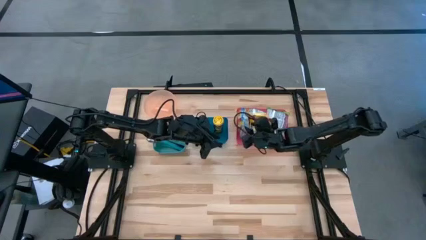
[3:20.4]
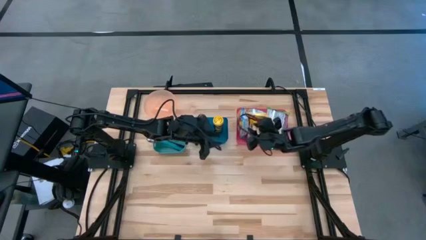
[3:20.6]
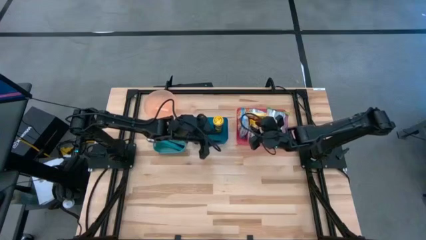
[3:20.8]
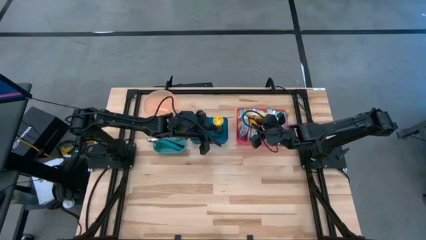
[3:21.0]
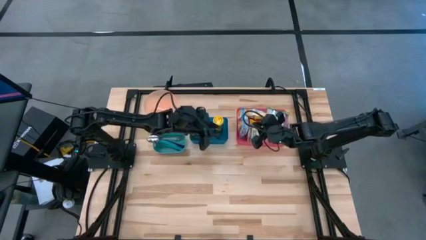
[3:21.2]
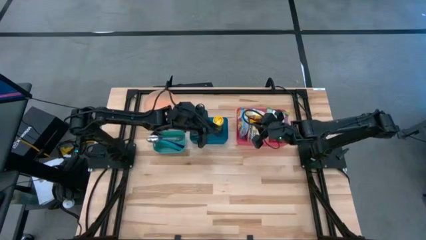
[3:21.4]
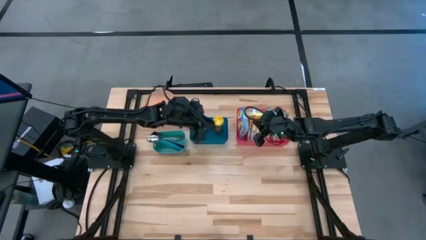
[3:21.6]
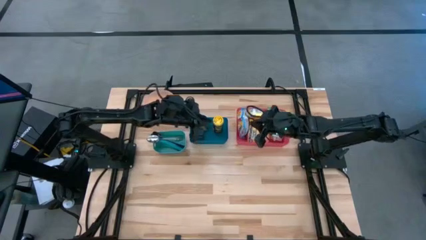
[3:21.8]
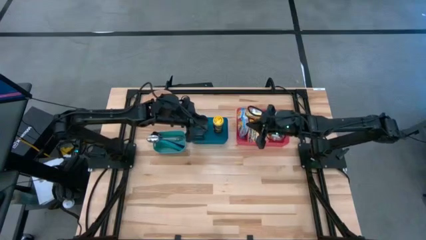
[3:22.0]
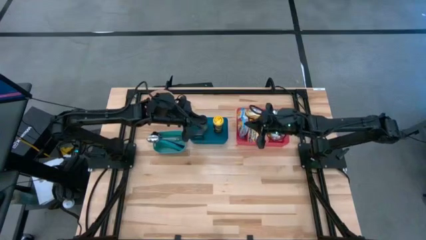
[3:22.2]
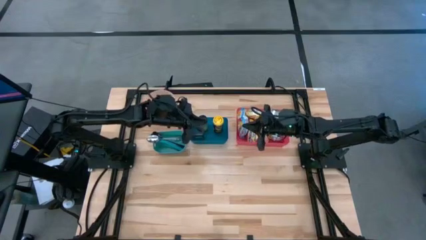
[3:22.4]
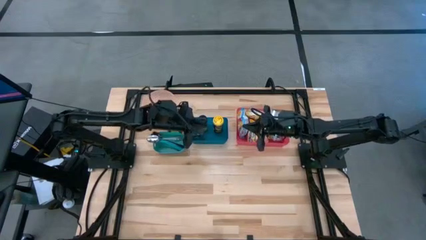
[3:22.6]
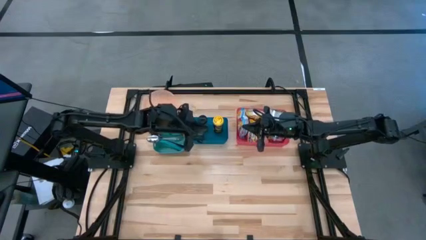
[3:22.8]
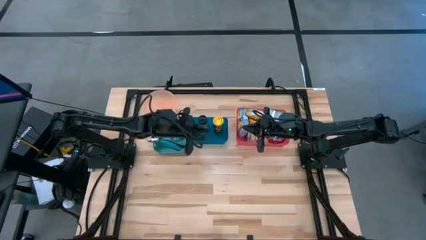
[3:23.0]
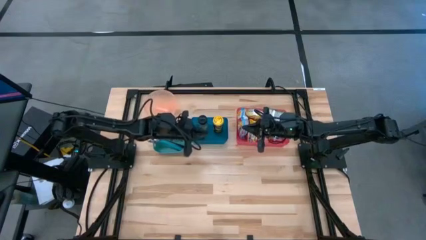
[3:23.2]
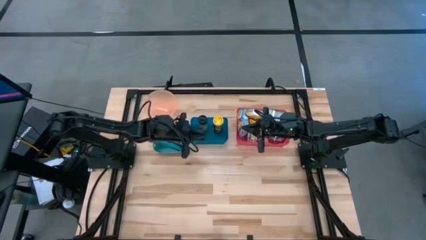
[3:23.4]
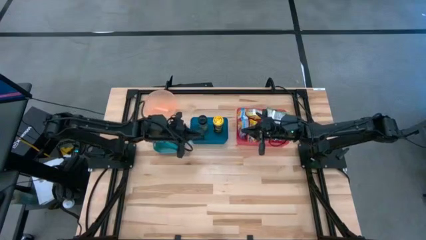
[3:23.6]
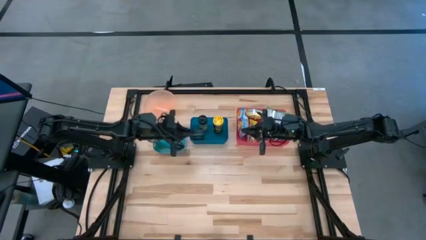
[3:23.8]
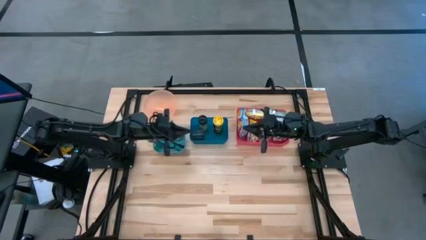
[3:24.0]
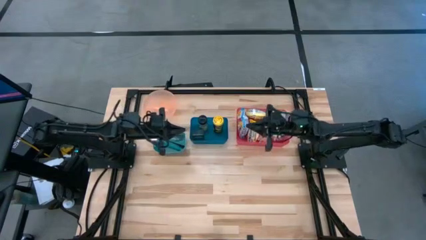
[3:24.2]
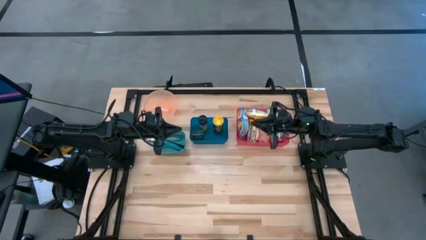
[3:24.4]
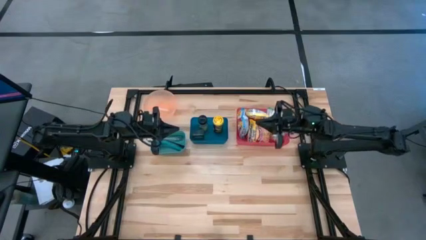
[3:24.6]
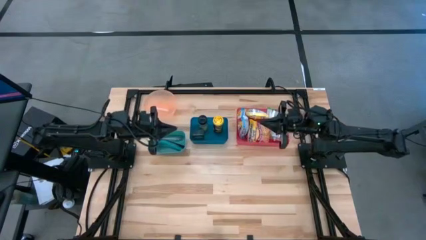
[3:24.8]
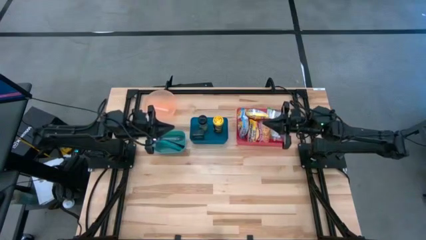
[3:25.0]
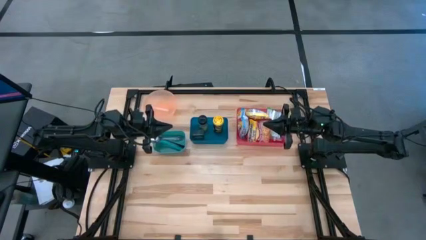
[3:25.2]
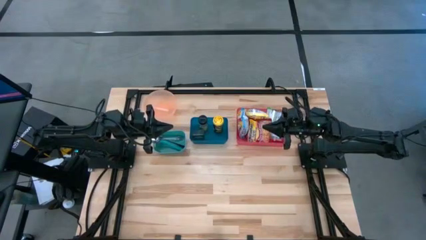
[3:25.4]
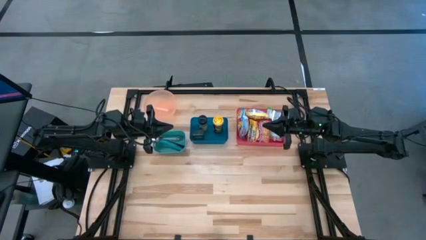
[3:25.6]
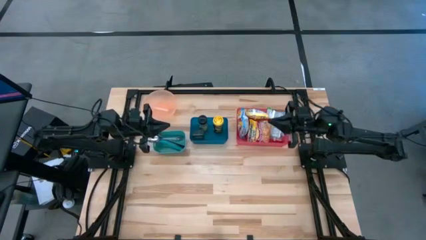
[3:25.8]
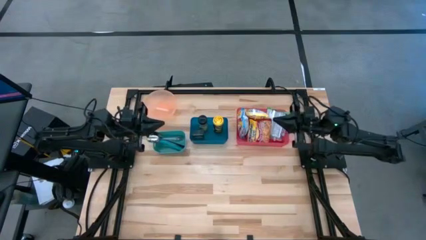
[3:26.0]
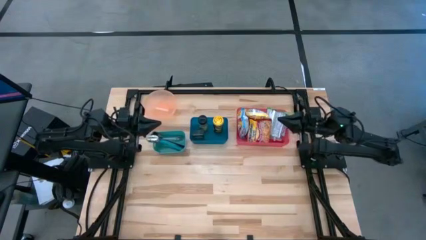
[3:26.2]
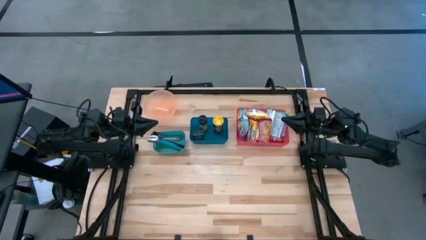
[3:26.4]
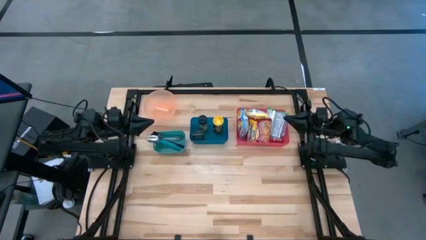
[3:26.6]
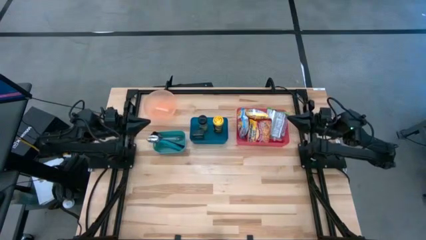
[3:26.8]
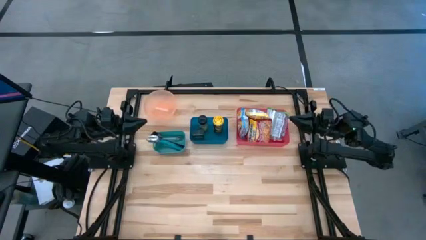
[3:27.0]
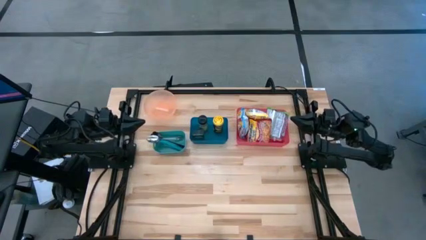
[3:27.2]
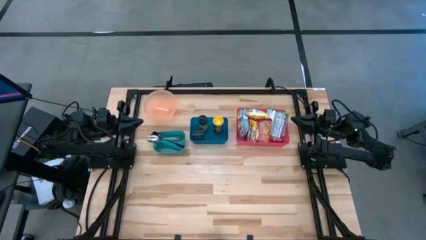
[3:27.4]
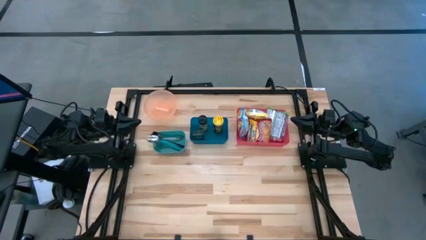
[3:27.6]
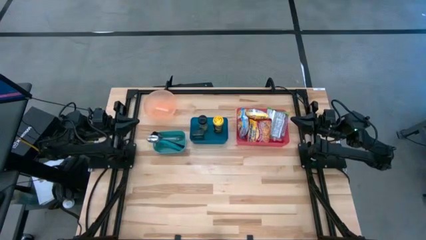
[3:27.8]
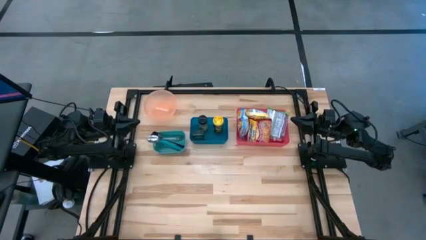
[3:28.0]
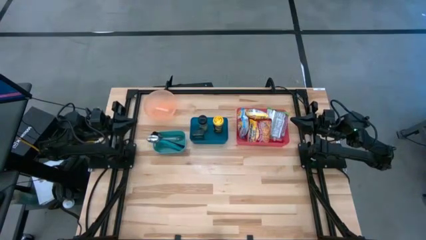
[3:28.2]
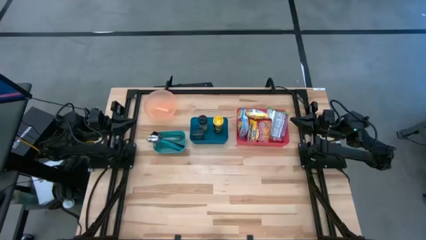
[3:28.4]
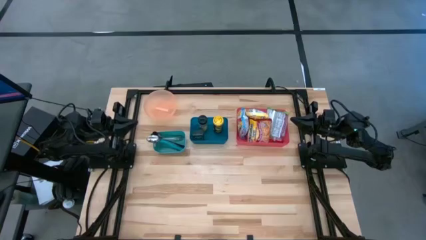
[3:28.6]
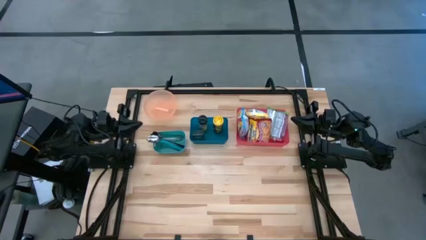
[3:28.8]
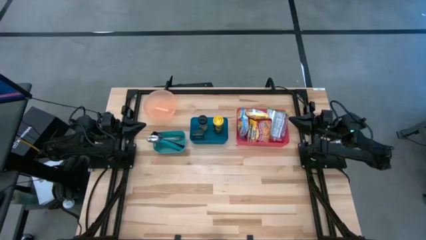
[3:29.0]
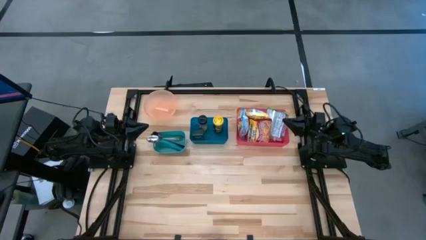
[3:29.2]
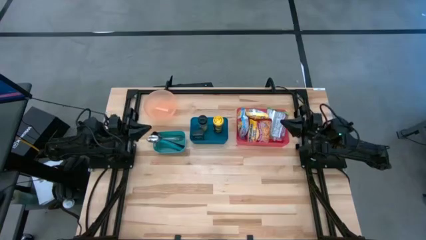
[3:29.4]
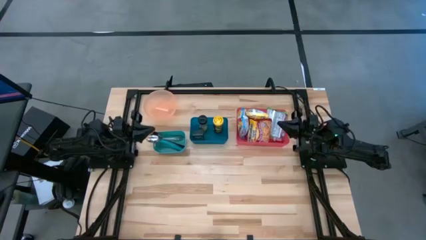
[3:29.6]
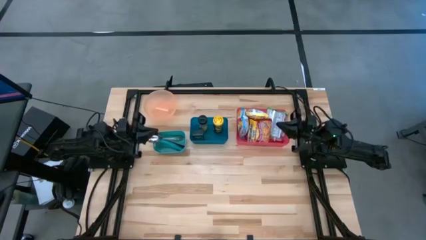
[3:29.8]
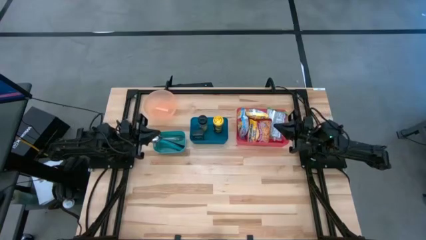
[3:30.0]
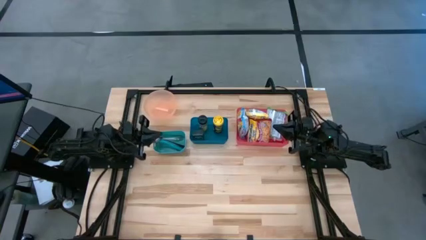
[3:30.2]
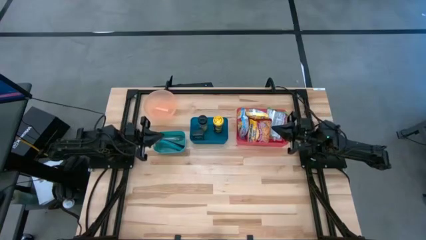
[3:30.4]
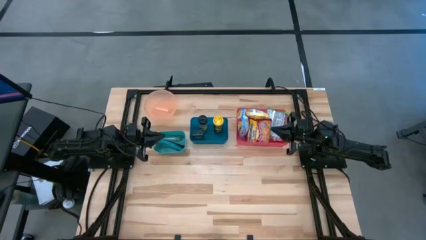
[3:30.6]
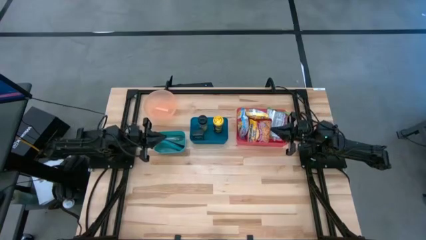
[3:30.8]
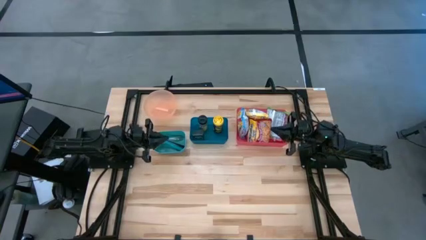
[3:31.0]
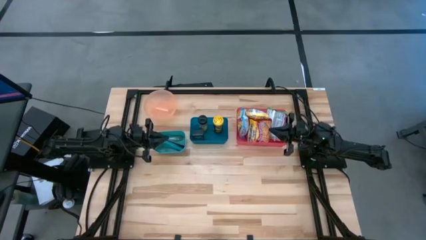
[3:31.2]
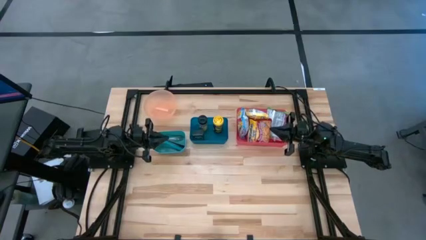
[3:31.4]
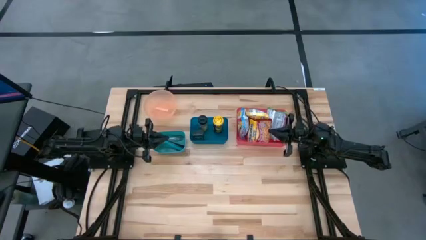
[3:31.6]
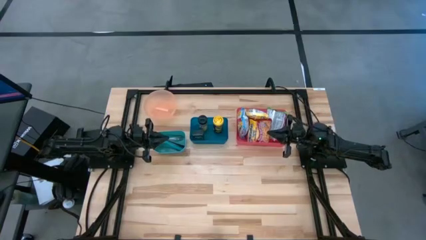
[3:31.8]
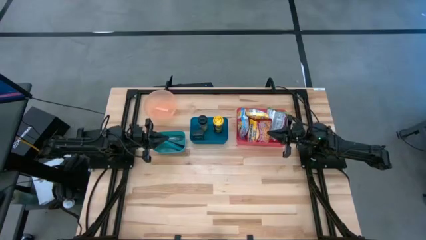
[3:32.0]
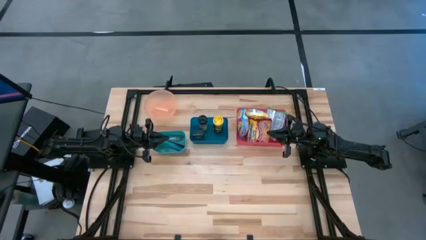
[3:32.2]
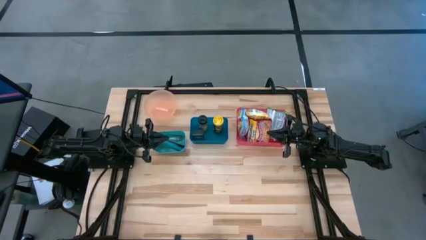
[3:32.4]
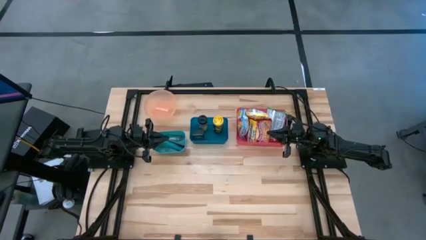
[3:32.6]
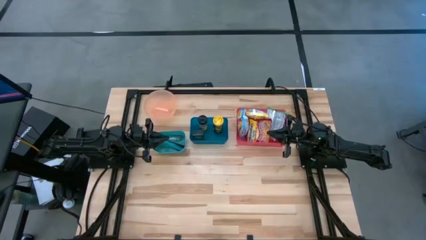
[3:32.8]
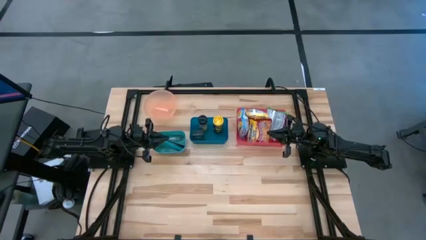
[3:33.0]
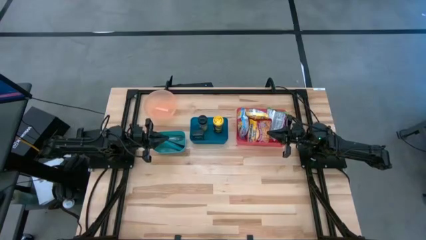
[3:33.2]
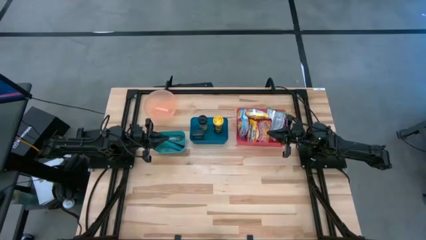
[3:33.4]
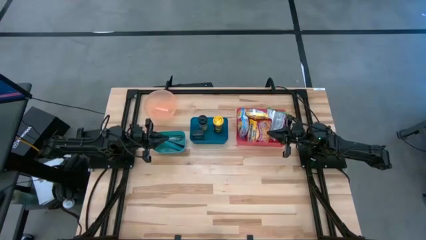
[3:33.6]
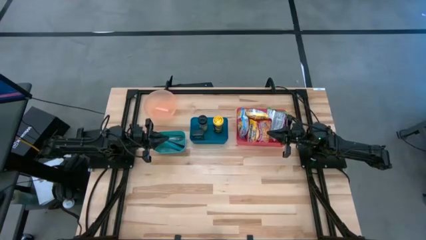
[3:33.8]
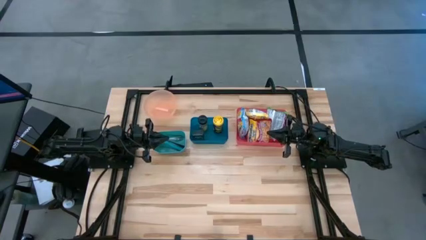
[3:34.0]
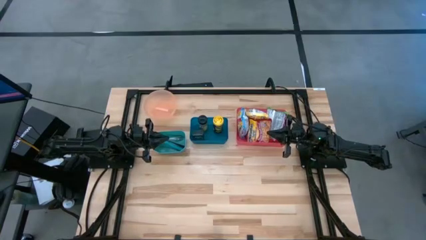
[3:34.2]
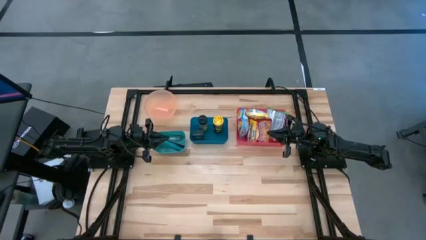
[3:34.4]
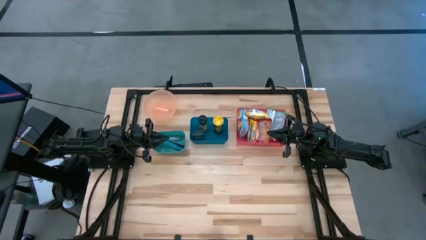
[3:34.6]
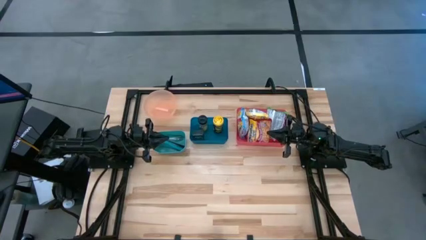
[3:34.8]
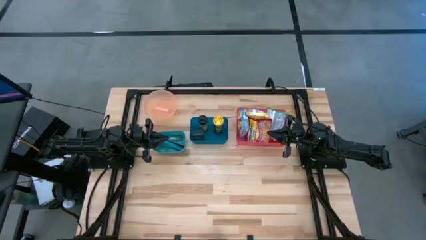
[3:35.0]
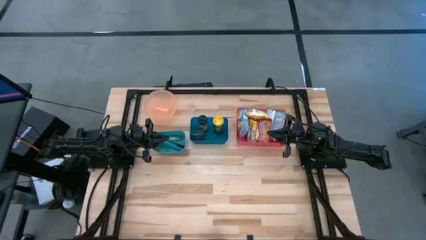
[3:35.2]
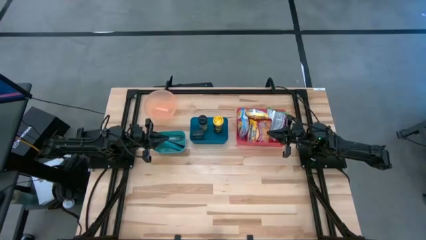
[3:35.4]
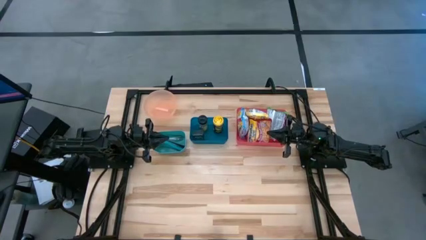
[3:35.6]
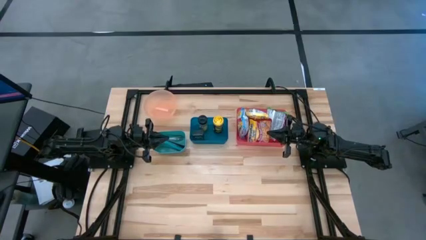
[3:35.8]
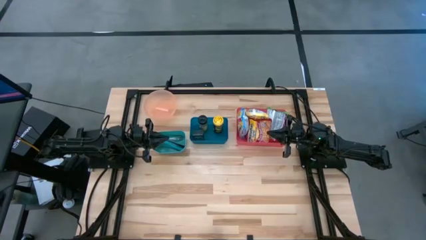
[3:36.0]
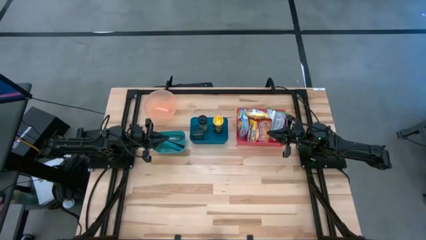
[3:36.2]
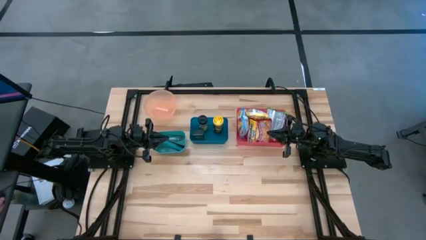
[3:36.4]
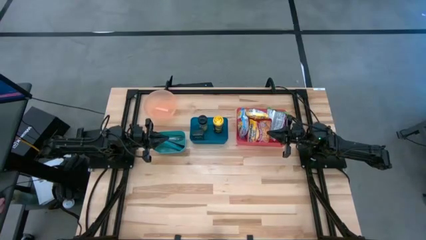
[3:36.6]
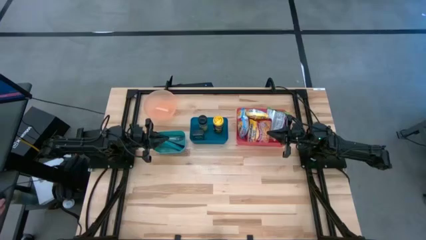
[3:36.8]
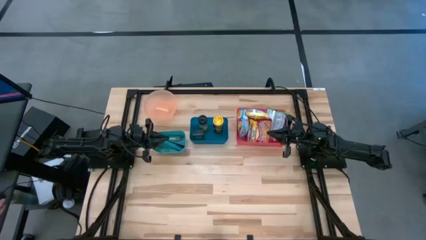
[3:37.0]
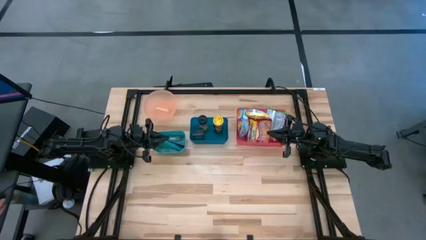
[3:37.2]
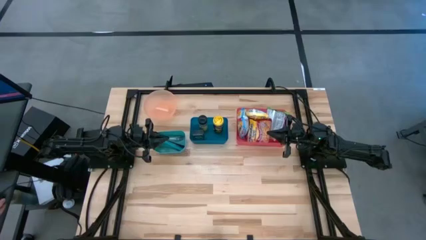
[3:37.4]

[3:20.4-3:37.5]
Task: Pick & Place Food Item
Return to Home Position
